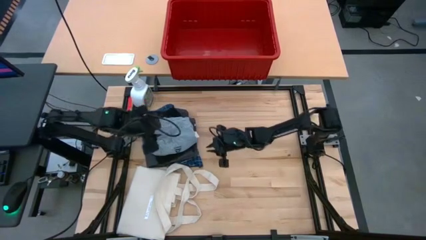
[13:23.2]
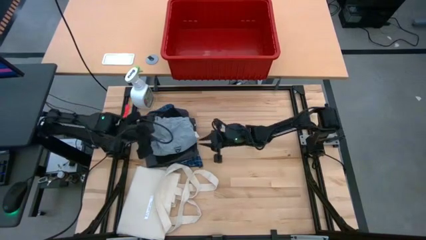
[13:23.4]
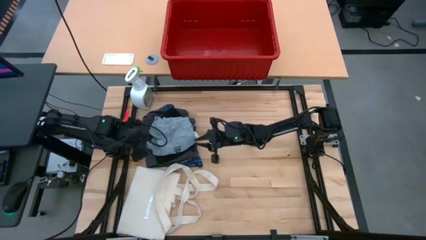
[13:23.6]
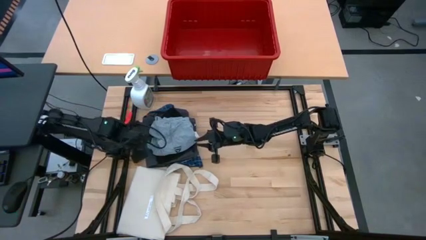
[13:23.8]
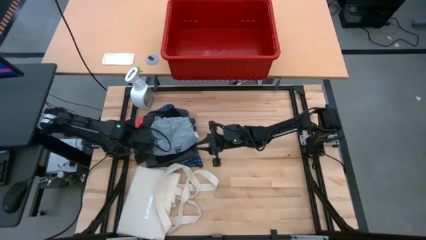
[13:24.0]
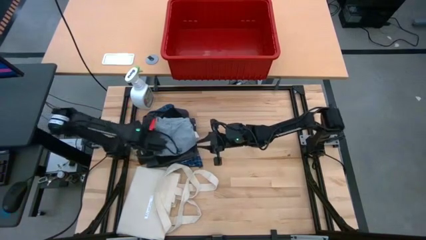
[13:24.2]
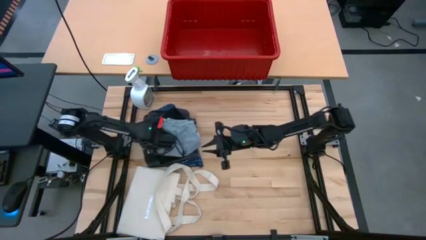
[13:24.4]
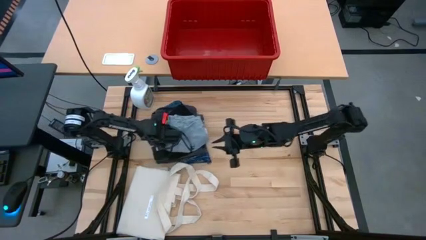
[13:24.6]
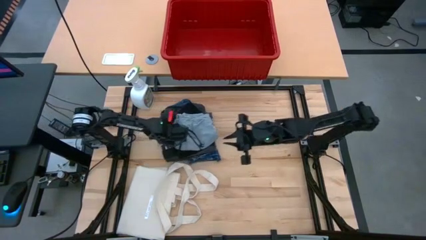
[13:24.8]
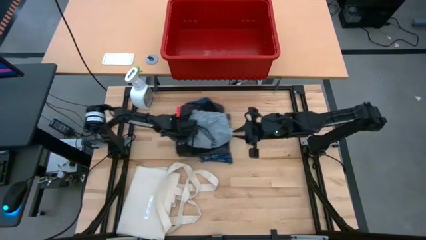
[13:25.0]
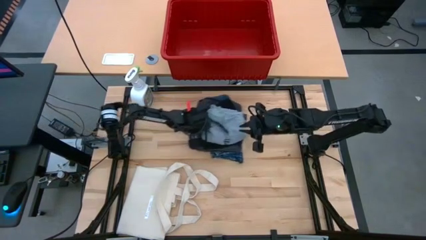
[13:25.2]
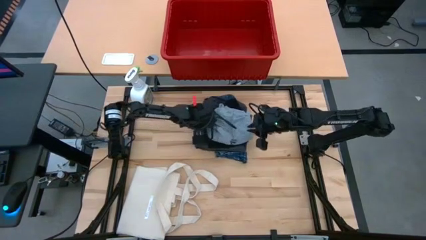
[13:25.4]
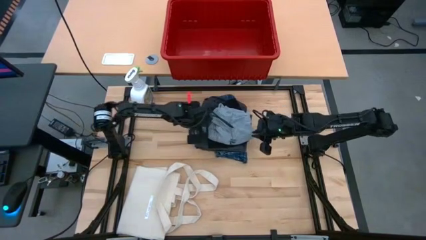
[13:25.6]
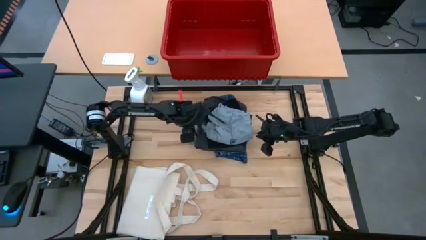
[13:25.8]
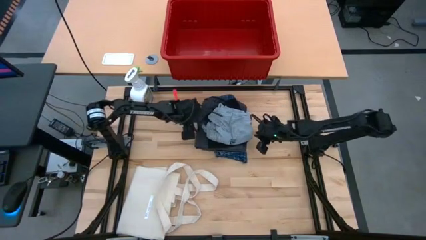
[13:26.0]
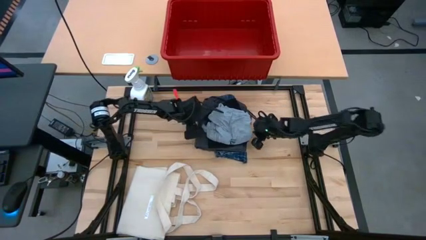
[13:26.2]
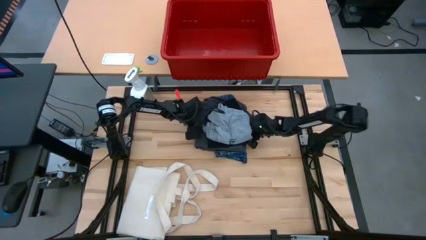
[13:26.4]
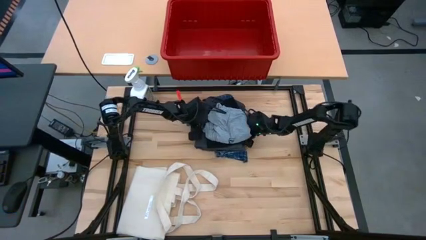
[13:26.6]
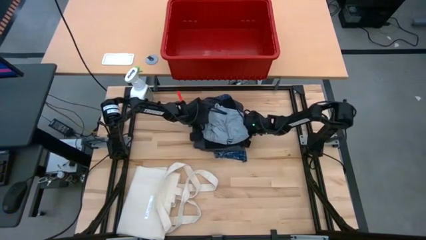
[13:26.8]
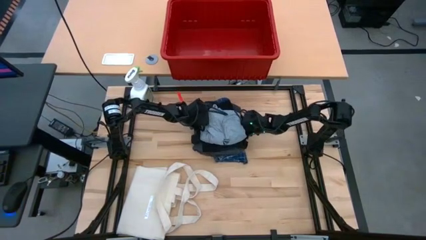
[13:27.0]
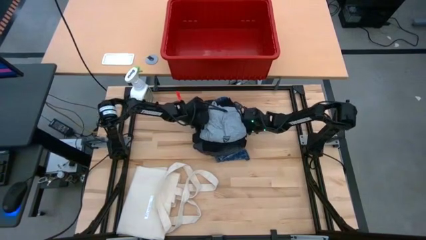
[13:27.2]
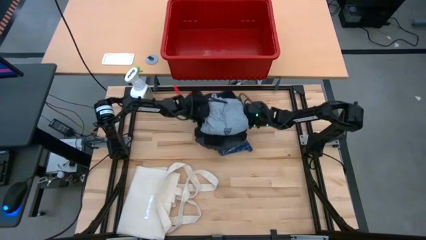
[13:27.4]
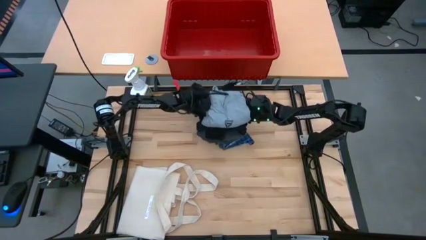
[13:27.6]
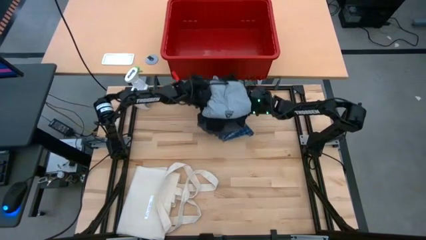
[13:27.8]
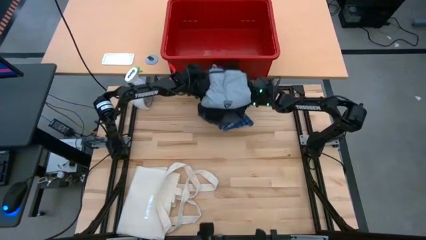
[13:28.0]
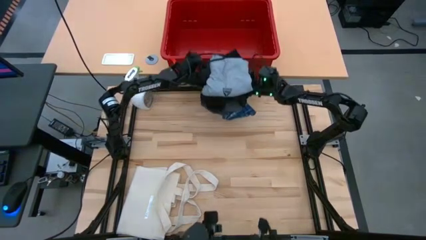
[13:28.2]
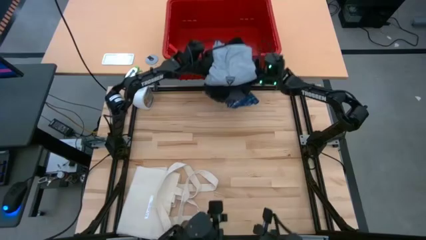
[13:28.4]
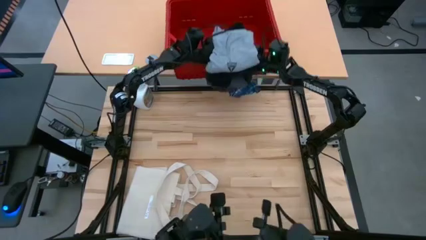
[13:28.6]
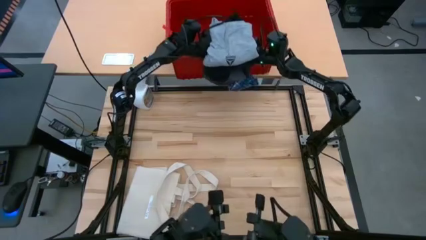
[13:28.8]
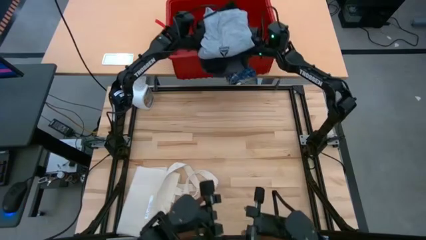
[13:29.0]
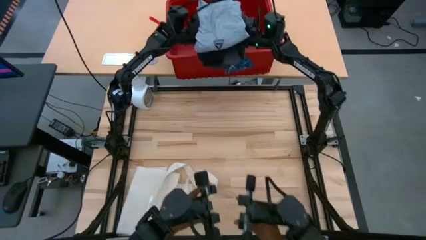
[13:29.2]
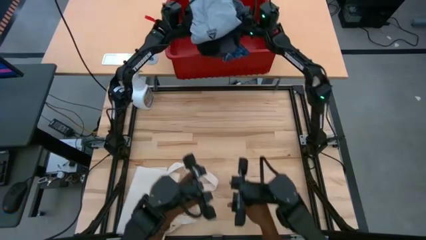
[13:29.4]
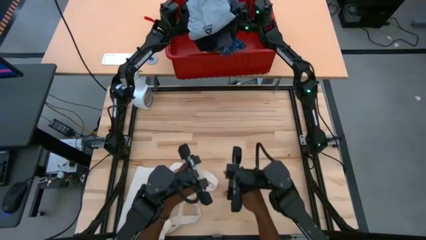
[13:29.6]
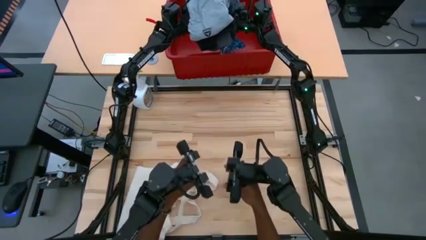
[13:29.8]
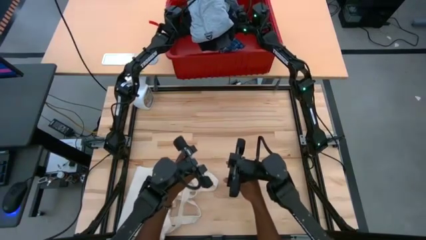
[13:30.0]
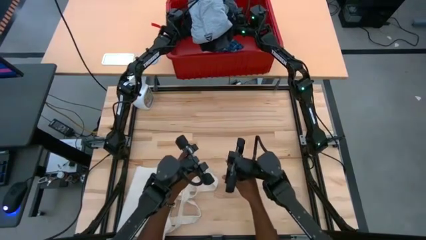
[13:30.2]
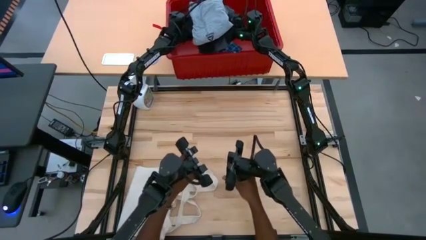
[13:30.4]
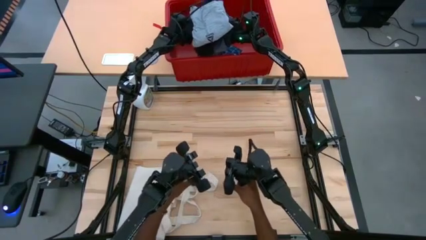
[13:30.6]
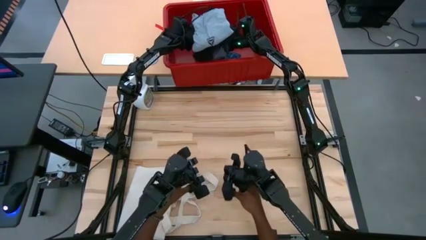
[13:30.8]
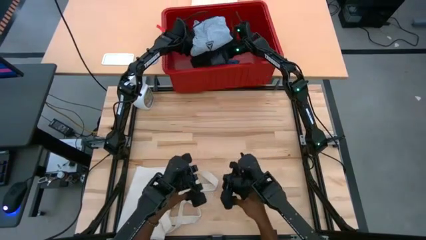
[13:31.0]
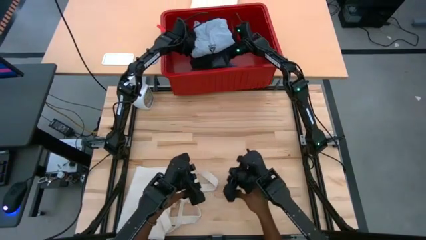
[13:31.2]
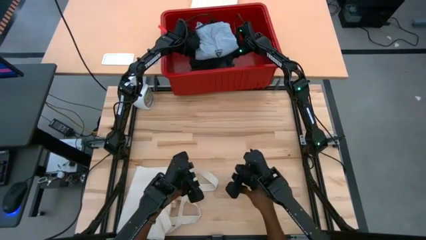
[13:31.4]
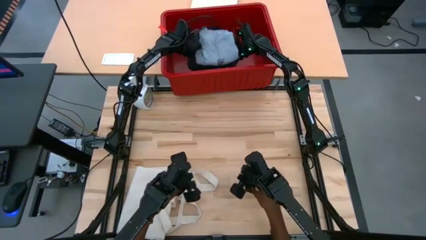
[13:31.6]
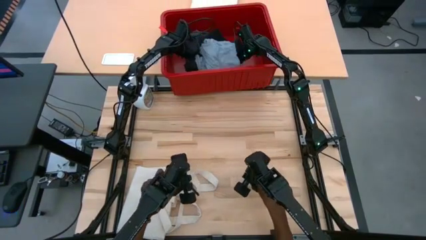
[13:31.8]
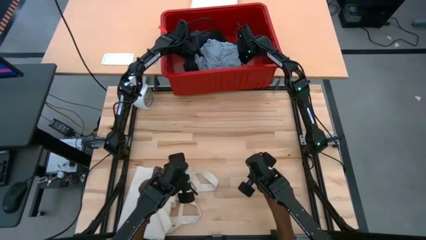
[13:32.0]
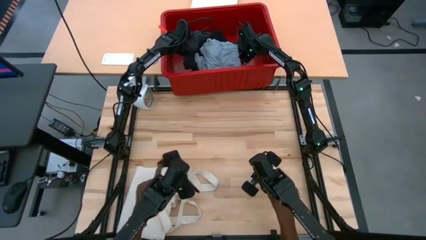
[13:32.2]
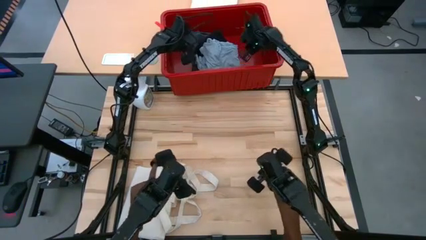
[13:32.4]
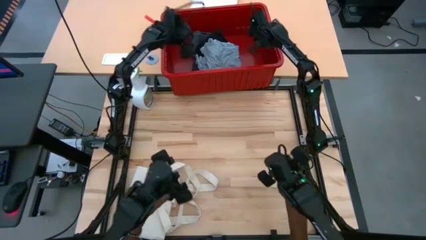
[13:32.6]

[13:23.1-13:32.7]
Task: Fold Laundry from Bin
Put clothes including shirts, short and pants

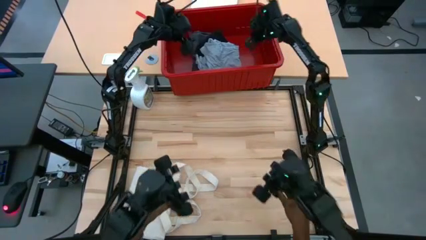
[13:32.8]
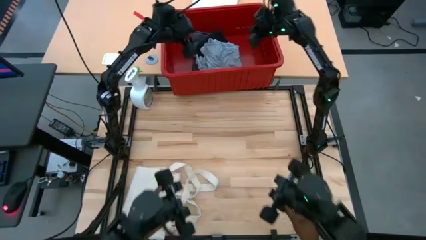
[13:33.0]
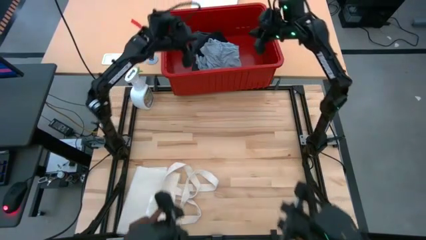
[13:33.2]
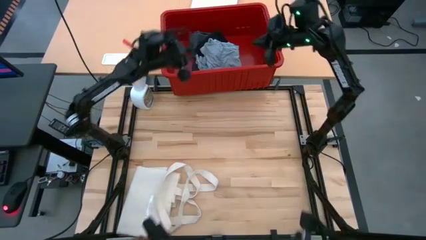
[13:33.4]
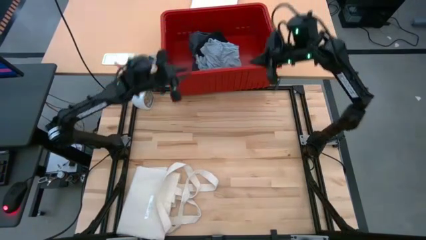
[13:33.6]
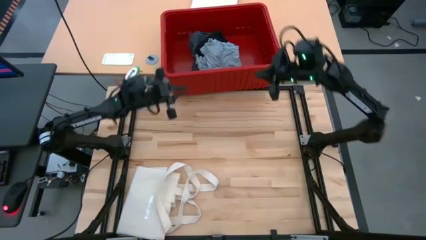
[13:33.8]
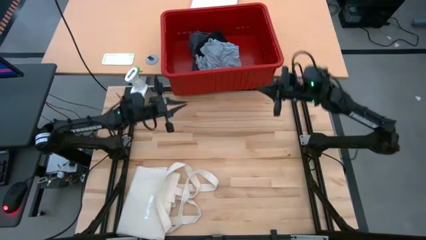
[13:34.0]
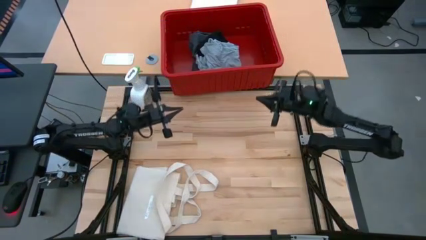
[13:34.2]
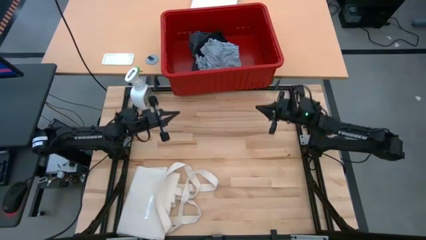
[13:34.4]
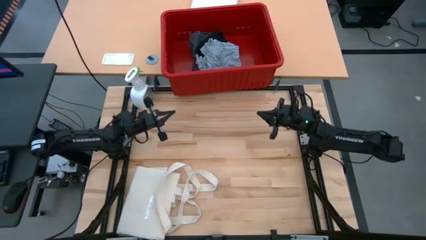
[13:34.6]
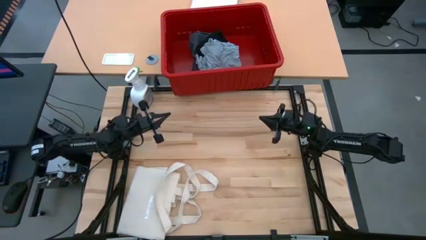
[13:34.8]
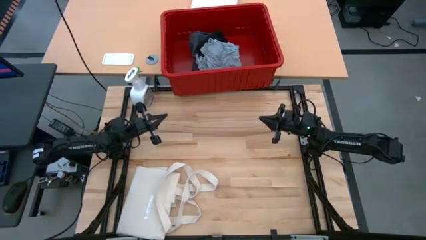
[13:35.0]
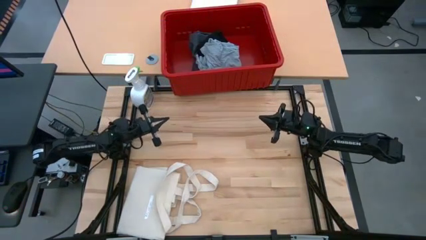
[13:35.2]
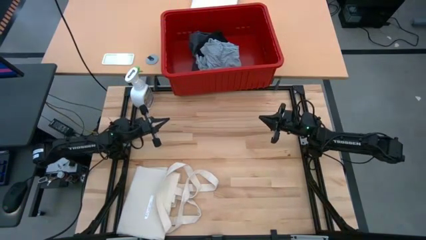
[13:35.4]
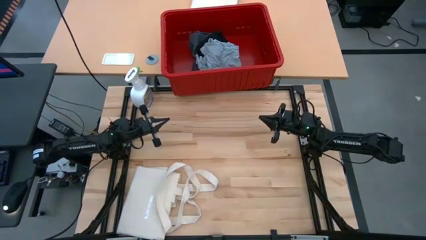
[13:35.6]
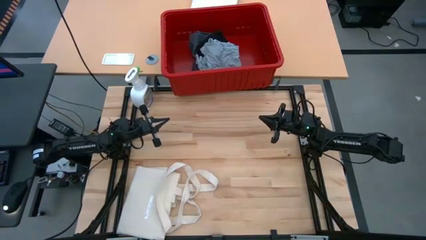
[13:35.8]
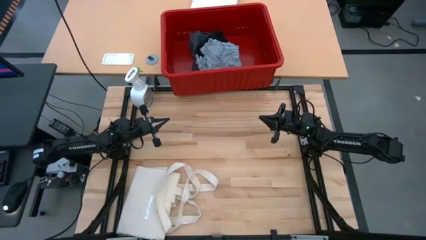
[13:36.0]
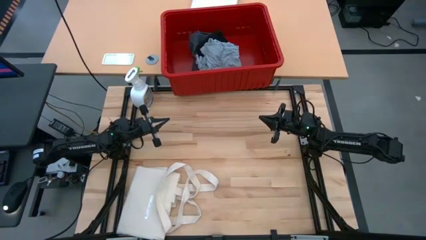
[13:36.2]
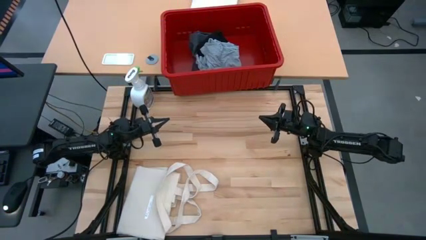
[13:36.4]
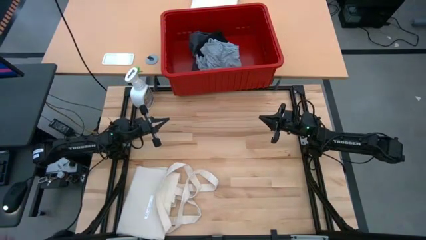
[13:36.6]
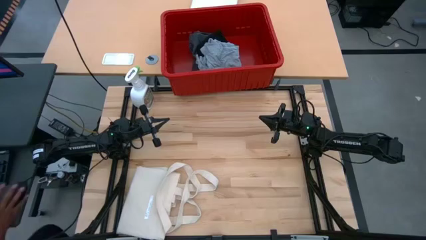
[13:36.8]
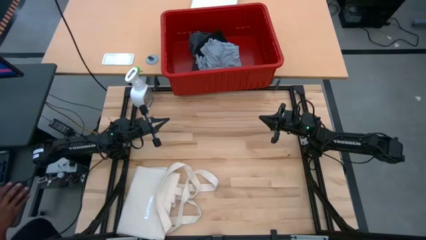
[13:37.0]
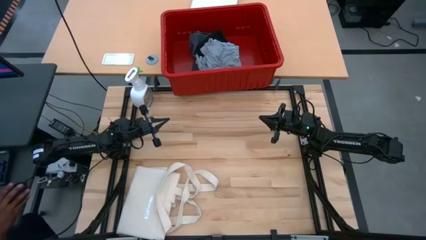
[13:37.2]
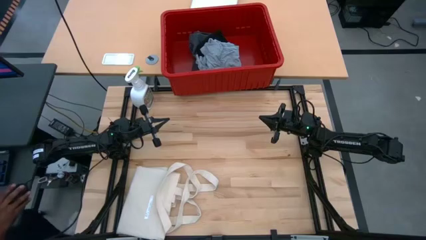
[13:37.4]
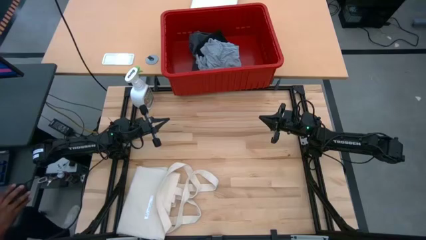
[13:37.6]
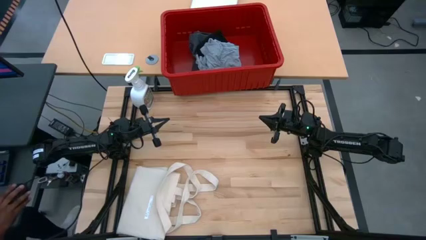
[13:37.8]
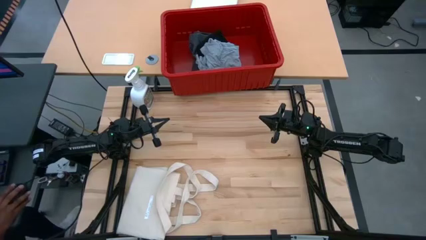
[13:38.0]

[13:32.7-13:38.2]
Return to Home Position
